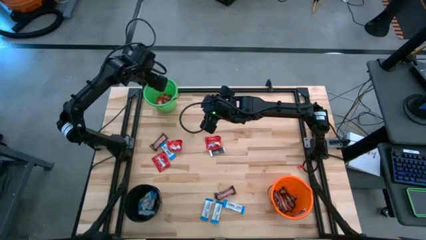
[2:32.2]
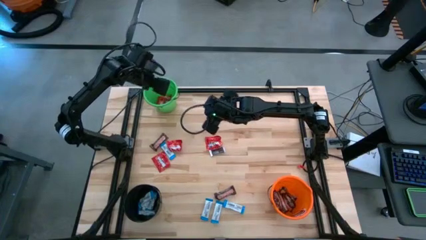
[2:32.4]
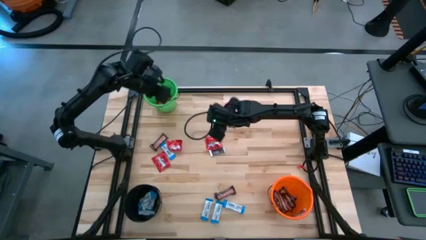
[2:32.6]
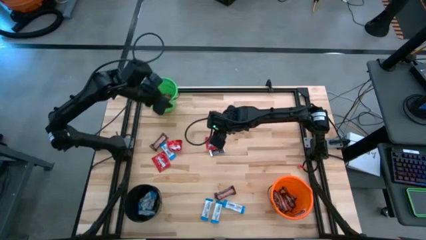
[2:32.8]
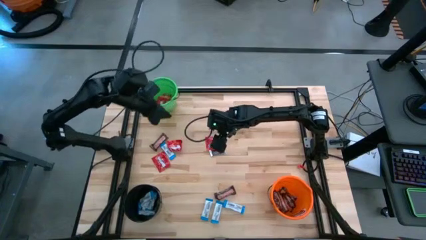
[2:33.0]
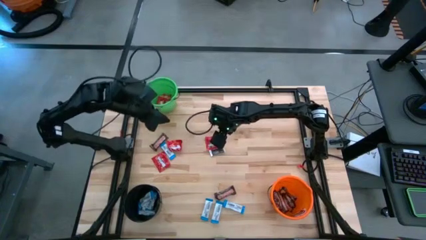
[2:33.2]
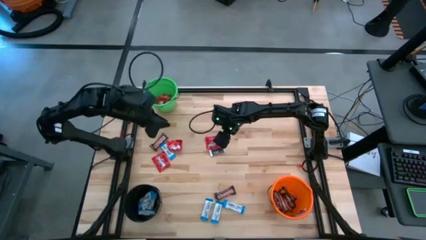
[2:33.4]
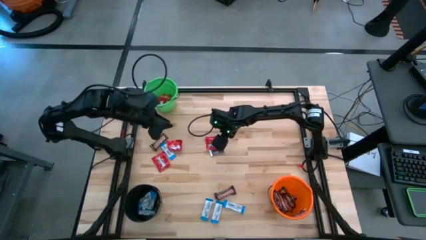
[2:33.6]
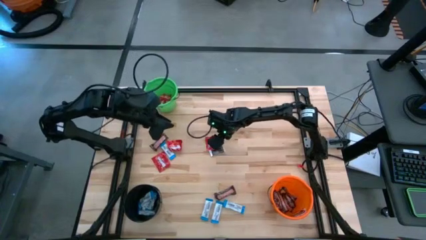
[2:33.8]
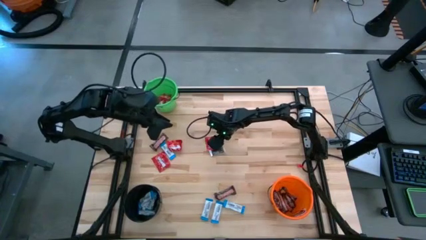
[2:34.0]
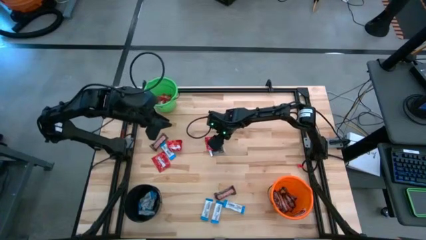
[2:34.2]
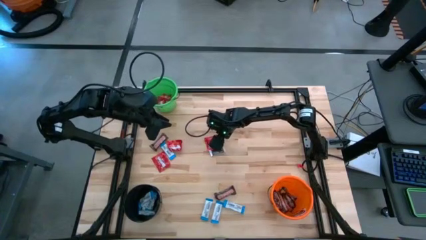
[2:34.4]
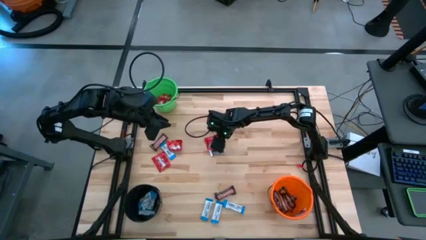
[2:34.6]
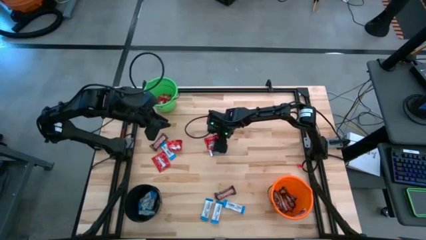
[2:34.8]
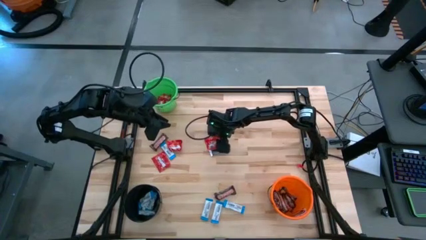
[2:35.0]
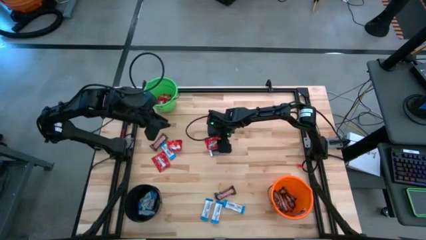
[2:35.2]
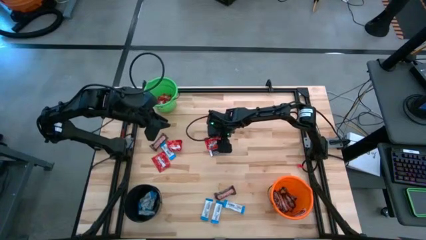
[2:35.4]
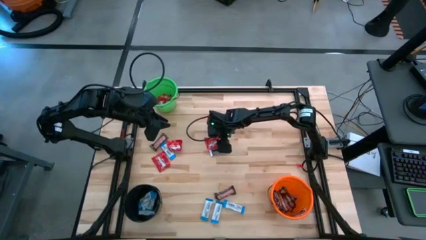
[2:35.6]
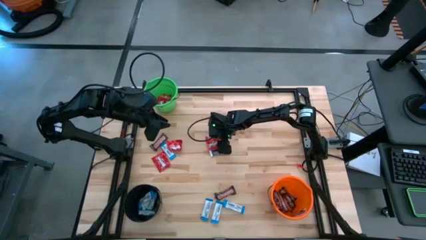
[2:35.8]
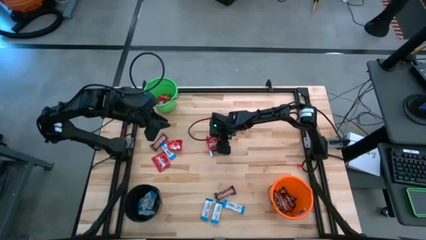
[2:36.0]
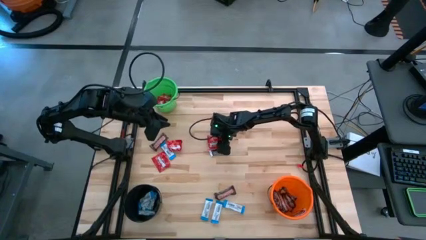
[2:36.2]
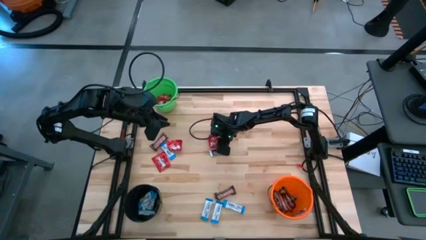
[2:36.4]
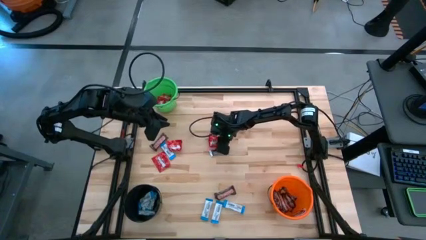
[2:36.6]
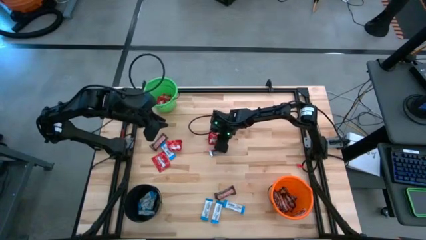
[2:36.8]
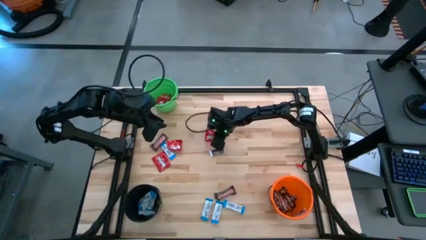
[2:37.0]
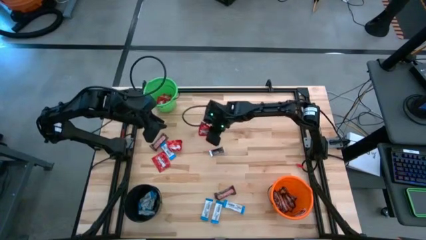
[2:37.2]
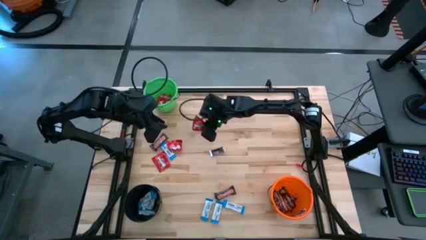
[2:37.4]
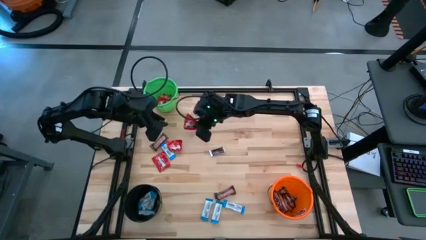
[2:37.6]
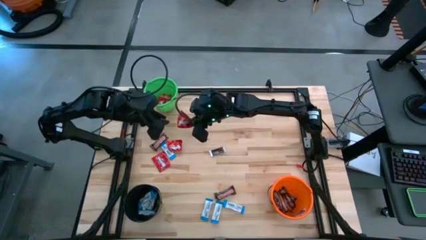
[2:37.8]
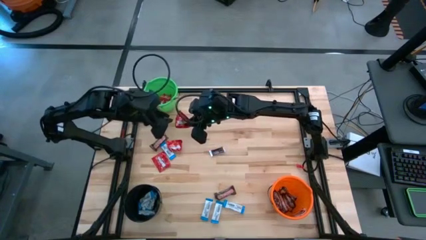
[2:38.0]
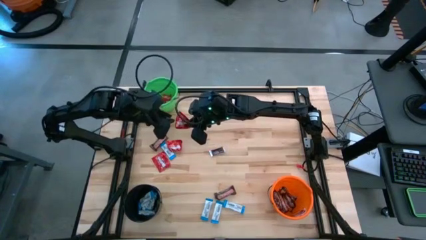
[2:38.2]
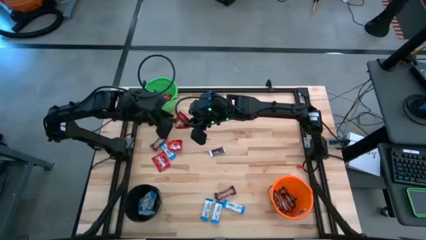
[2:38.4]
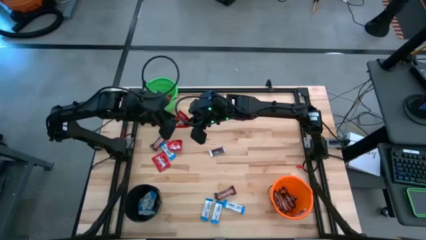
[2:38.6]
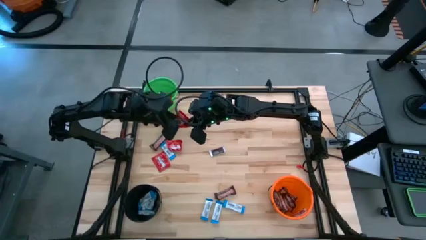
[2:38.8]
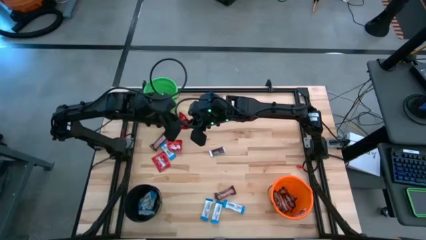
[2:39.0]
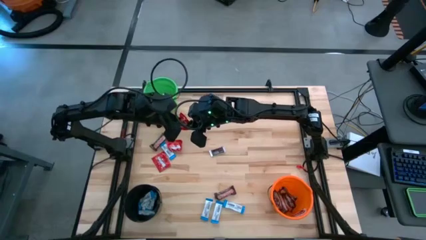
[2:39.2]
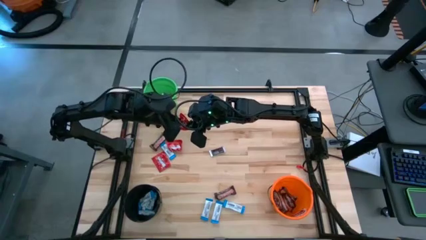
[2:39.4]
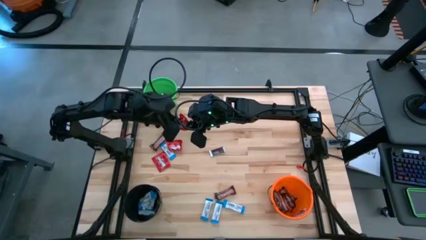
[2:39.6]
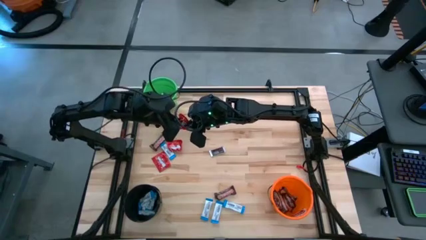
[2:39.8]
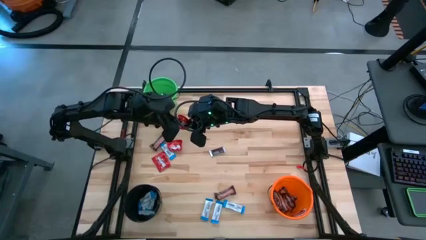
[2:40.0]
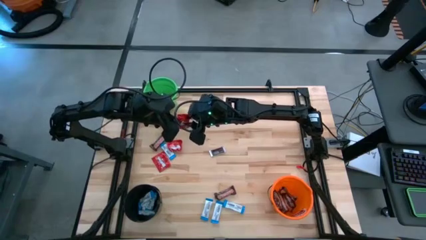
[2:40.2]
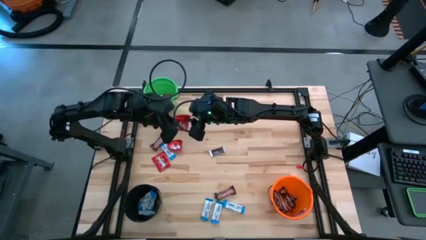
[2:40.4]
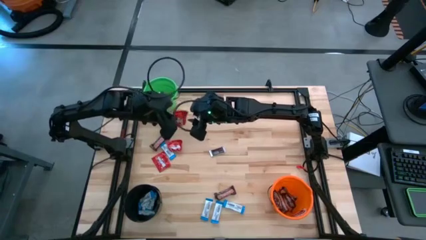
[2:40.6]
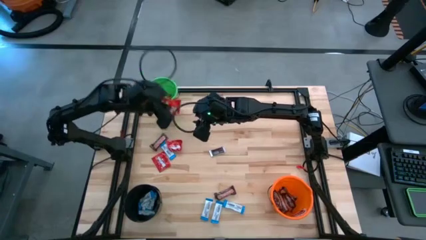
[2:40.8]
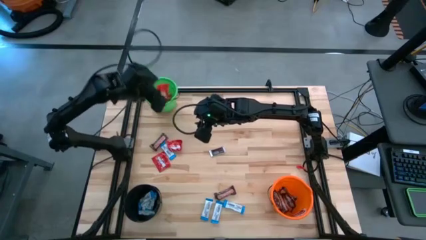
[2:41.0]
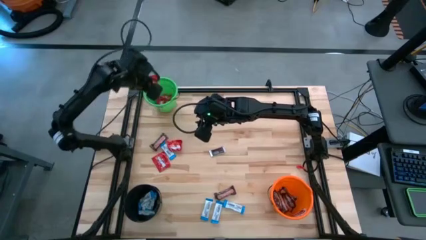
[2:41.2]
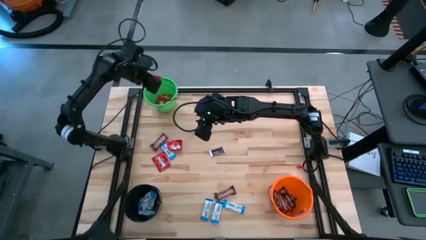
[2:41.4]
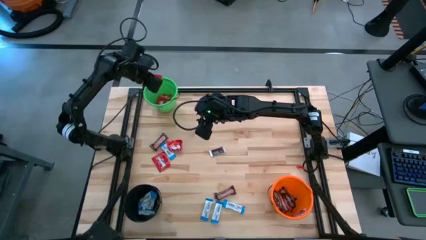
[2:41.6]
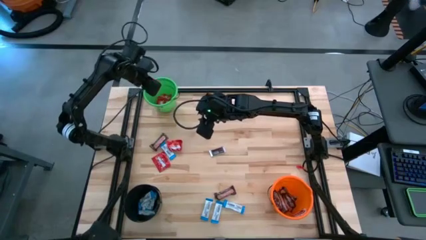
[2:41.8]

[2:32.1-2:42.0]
Task: Sort candy
Put the red candy into the green bucket

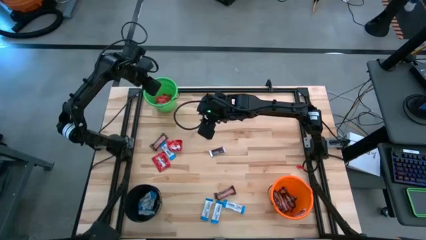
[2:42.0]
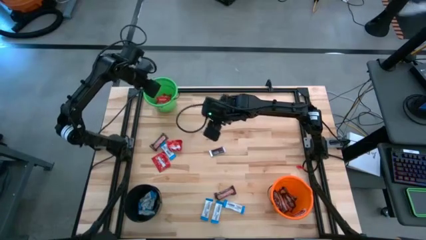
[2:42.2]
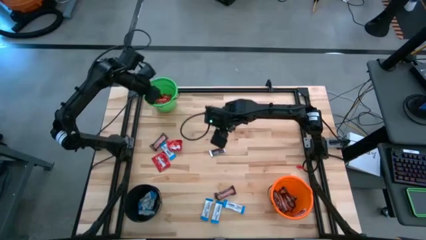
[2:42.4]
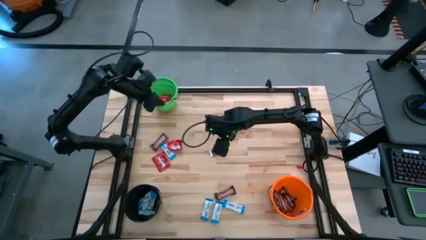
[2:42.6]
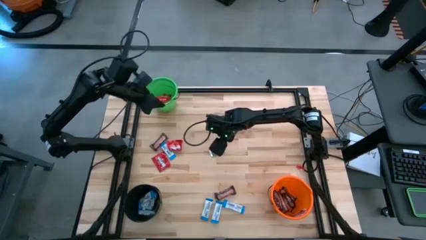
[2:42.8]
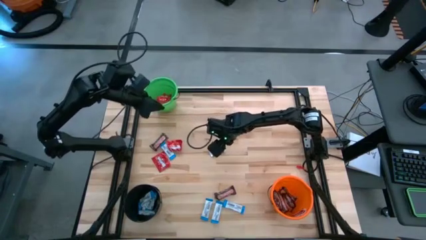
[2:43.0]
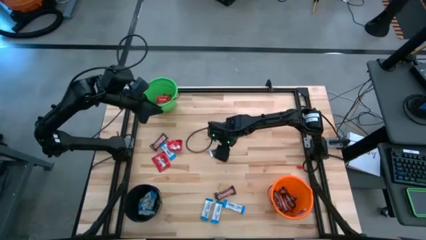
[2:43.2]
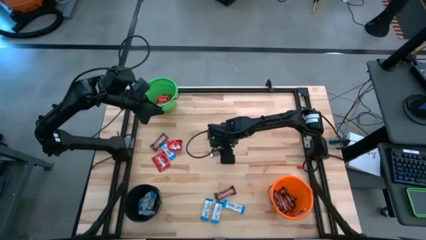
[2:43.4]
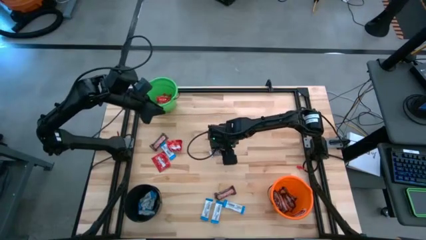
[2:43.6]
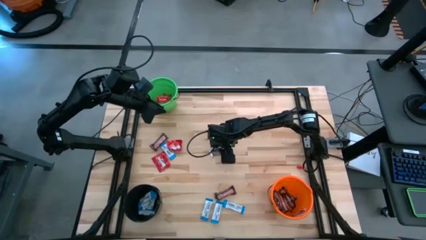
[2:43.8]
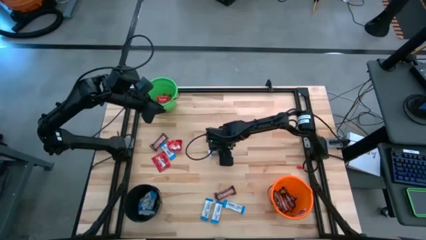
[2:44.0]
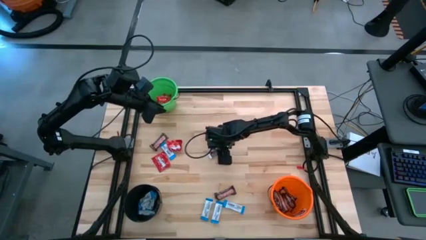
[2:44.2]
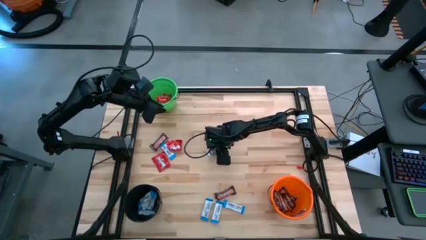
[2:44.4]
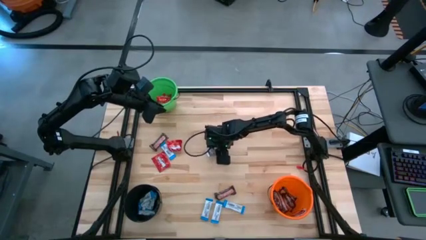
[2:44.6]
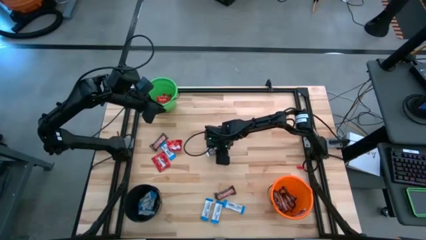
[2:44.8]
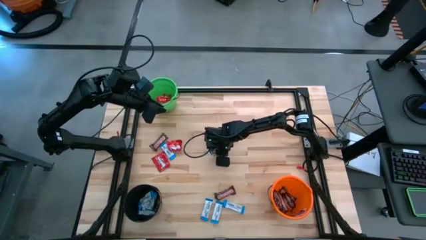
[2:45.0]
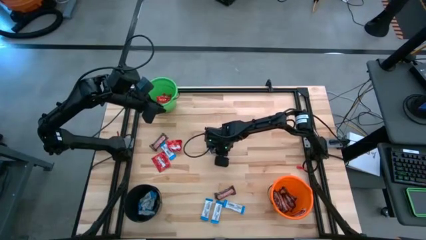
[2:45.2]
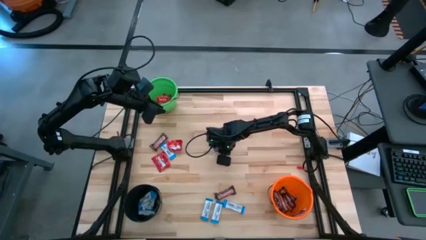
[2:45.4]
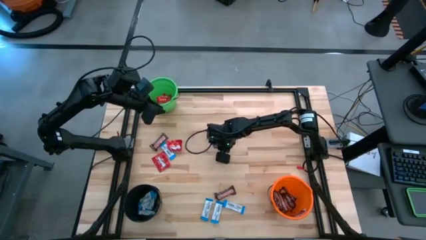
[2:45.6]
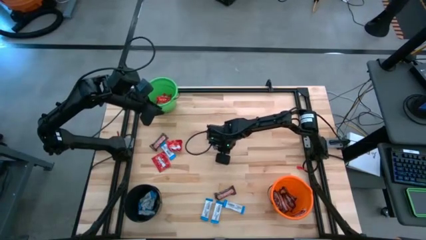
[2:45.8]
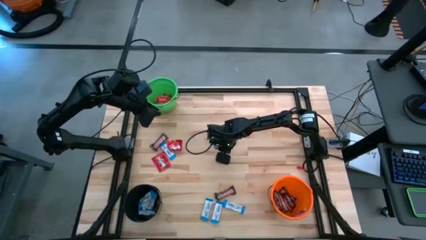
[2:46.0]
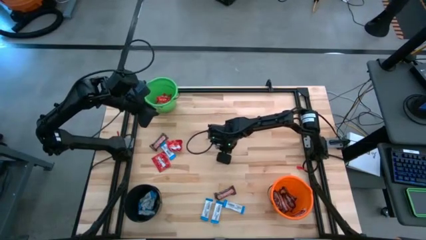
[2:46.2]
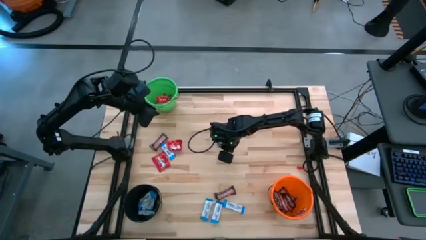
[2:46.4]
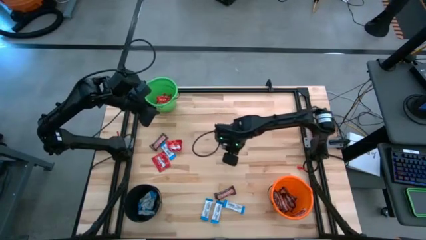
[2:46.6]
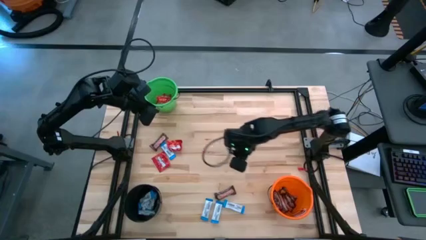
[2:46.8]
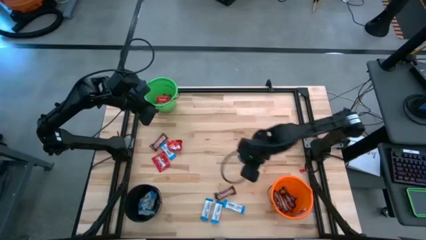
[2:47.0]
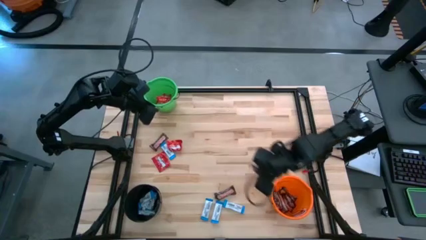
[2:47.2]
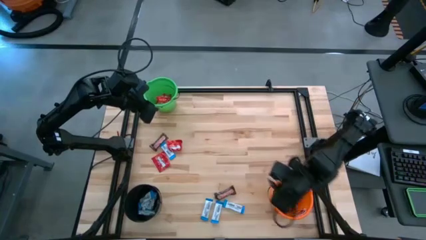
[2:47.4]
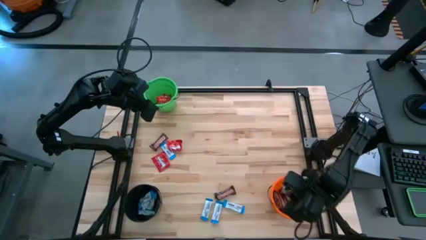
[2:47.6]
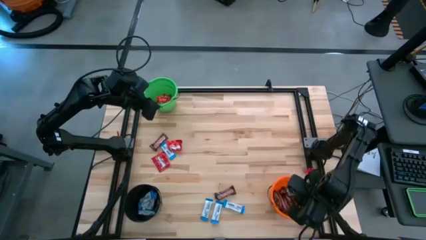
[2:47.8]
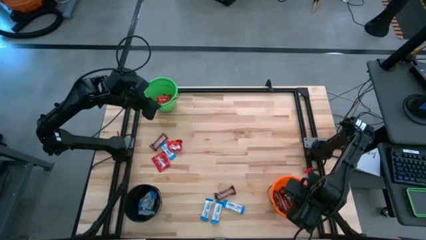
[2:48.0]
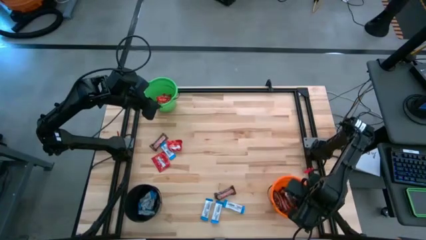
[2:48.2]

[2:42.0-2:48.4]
Put the brown chocolate into the orange bucket
